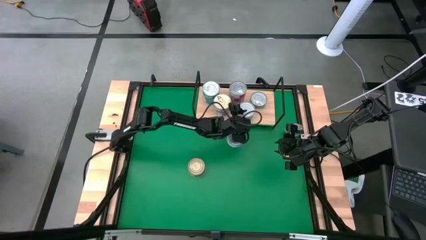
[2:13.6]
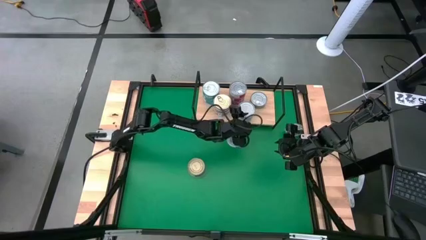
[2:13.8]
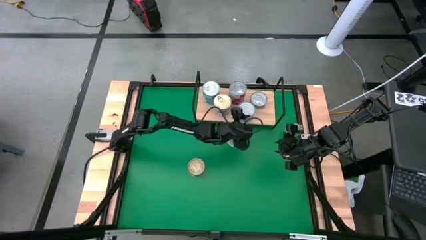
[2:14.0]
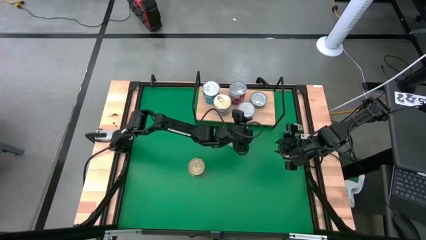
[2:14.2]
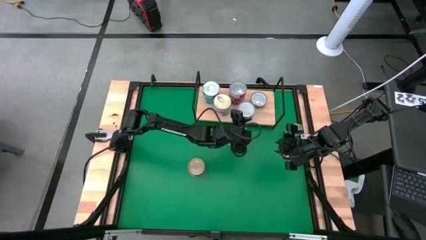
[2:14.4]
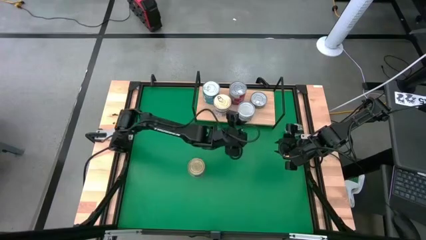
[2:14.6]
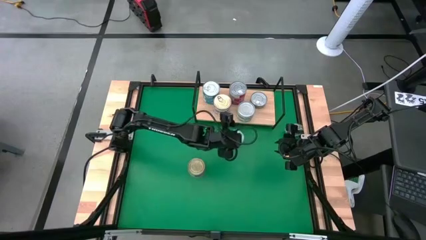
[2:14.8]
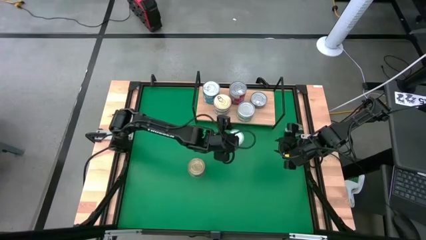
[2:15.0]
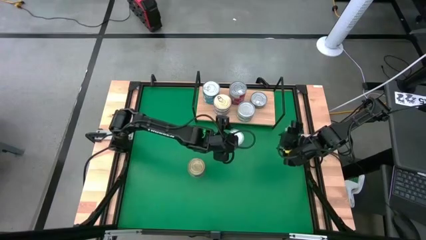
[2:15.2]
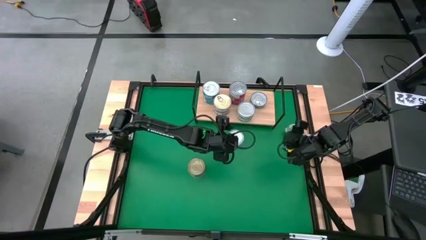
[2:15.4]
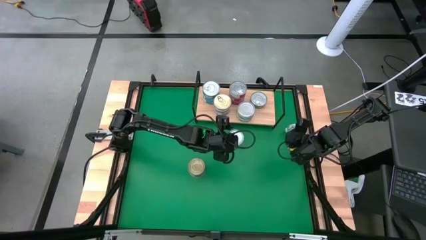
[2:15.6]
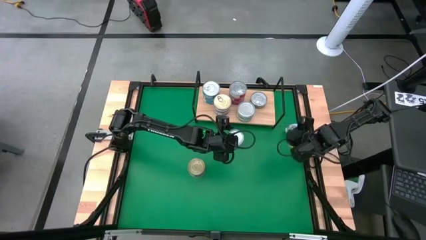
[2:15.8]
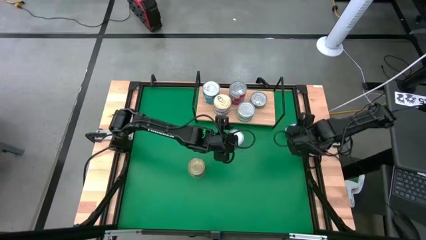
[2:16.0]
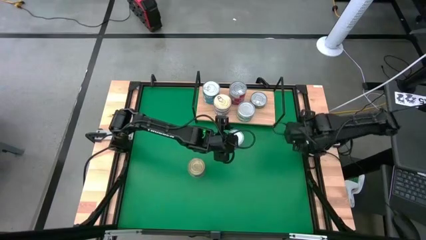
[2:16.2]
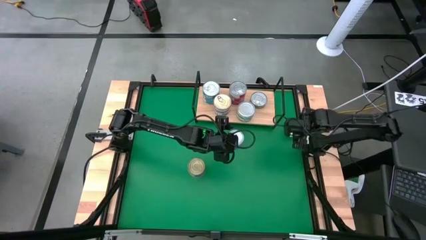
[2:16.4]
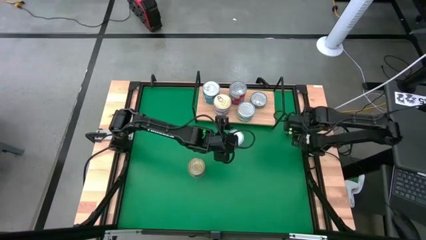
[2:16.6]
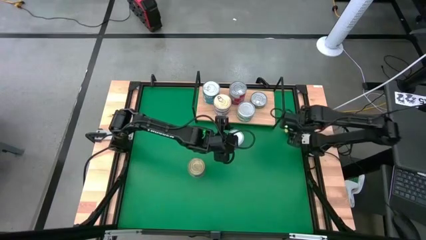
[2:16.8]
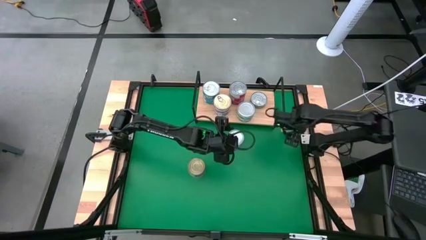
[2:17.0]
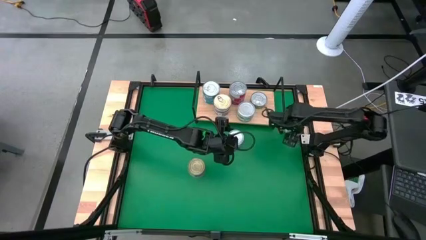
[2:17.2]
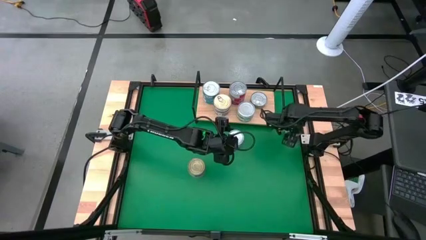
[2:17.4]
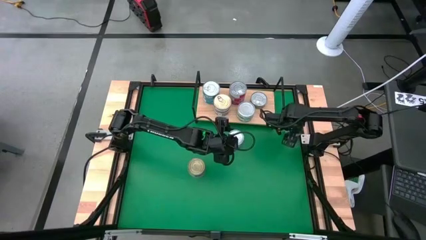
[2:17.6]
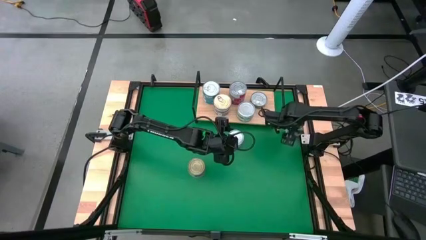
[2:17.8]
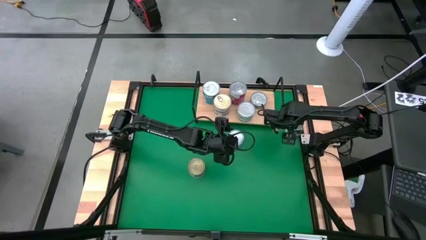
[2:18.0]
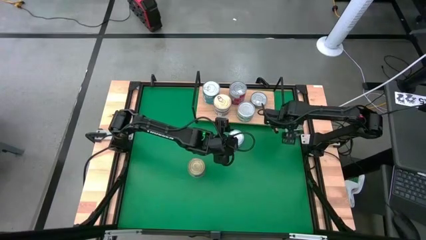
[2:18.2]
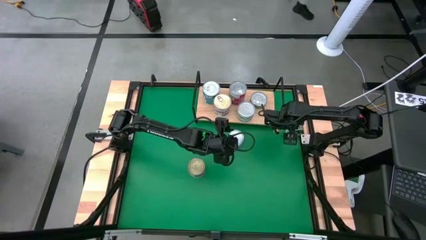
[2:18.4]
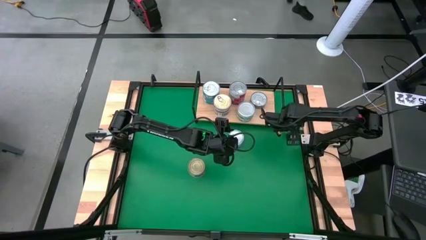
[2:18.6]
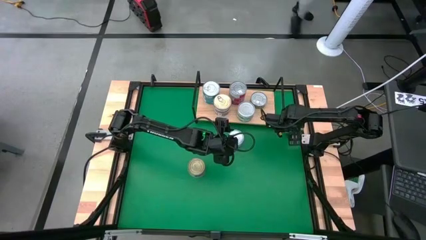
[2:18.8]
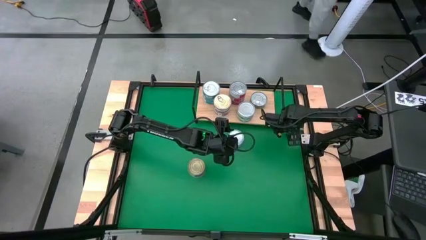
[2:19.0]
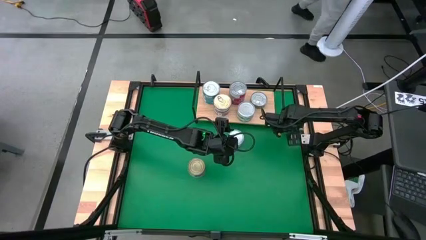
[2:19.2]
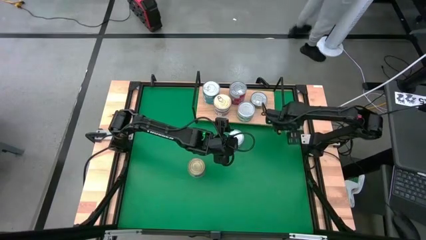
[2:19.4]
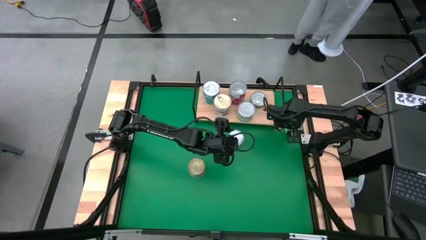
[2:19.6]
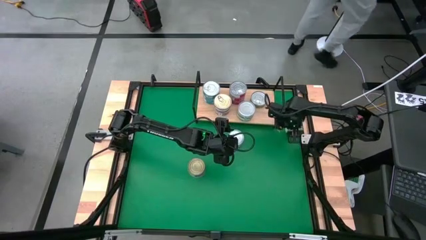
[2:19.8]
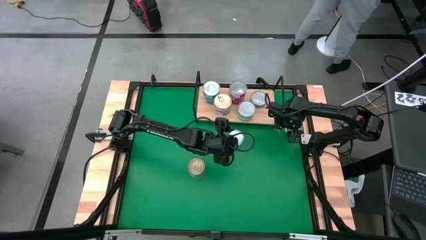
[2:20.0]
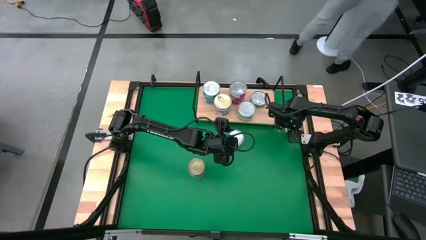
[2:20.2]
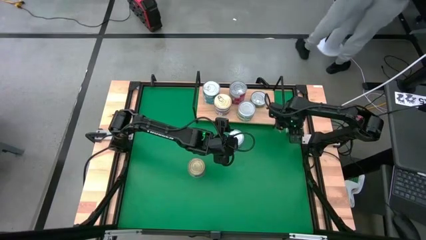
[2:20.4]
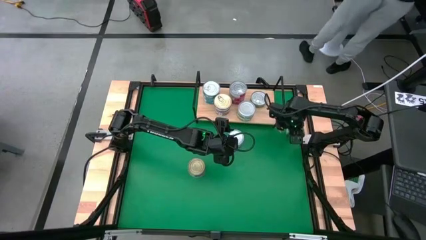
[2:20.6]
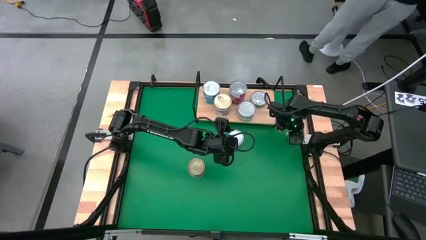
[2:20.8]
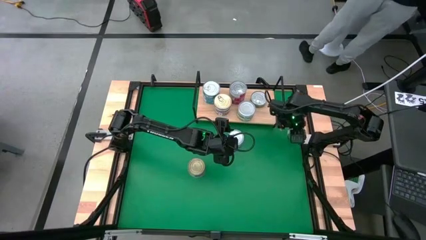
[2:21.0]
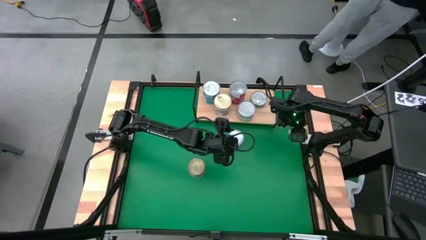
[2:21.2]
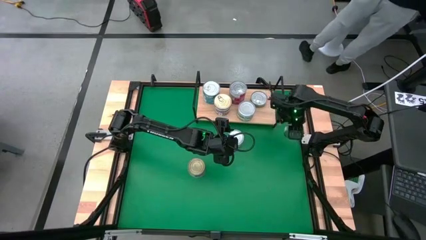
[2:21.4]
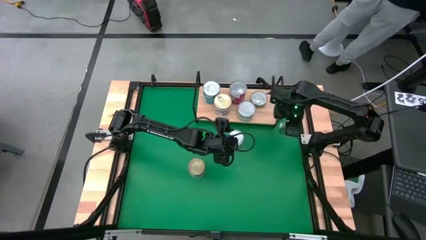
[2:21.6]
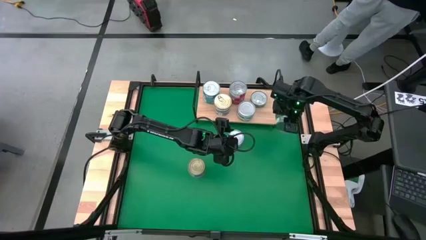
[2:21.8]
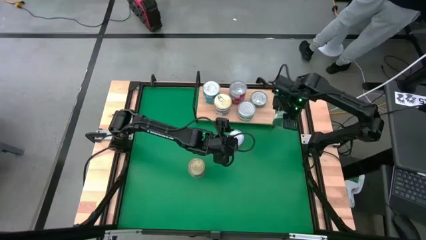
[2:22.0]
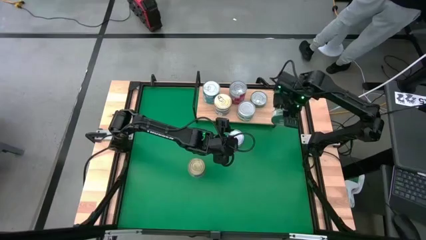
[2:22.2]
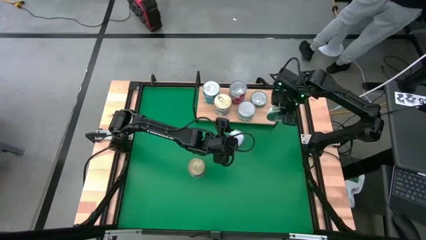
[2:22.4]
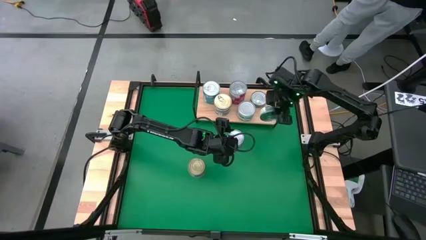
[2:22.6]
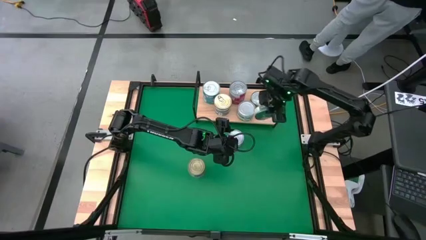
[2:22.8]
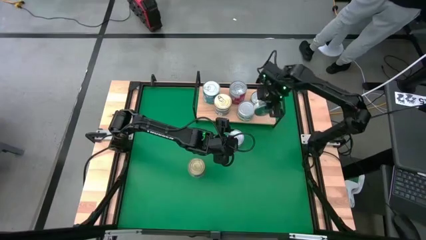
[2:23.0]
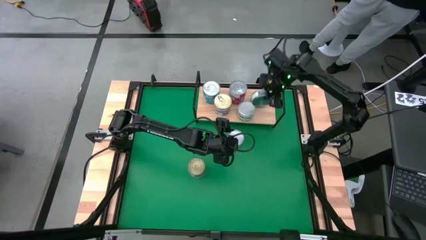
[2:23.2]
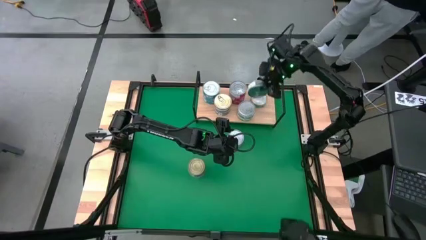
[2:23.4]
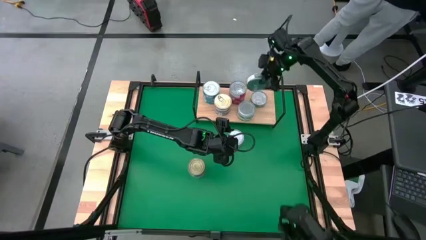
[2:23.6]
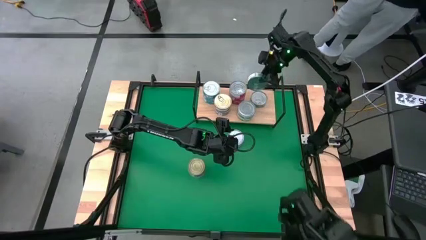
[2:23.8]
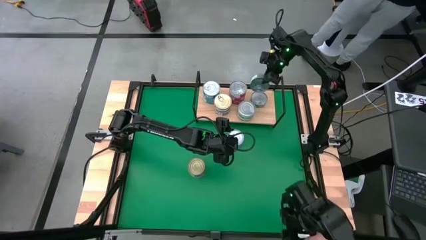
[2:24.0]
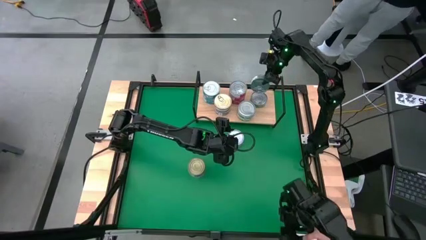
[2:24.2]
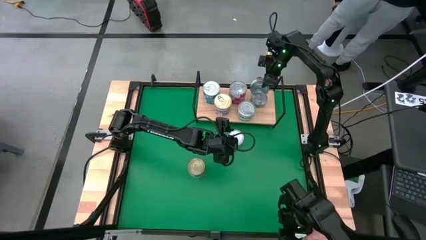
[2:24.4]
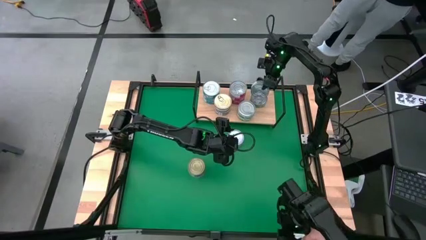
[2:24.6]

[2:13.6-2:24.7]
Task: Stack canned seafood by type on shelf
Stack the green tuna can on top of the green tuna can on the shelf

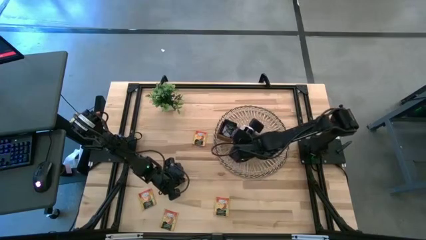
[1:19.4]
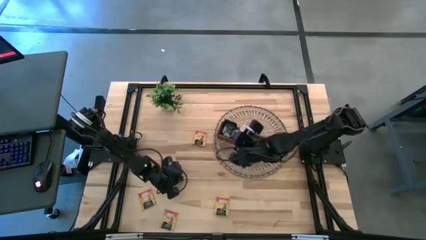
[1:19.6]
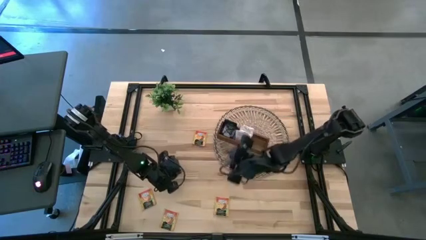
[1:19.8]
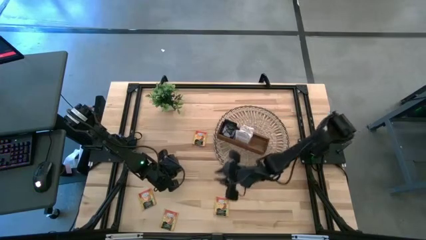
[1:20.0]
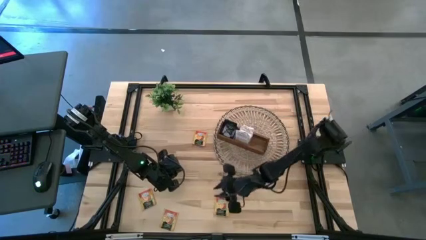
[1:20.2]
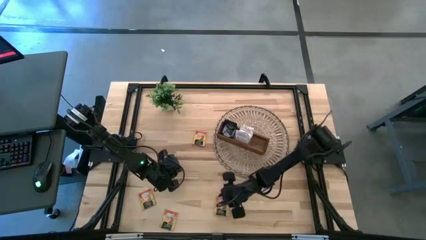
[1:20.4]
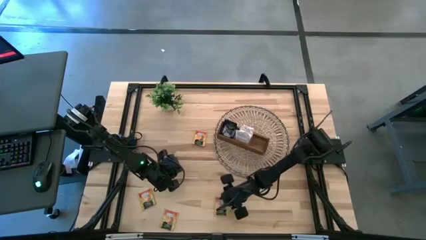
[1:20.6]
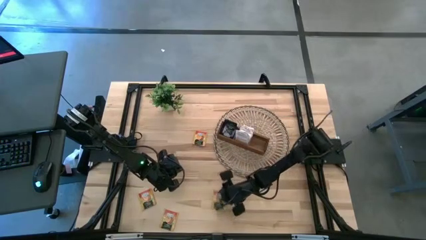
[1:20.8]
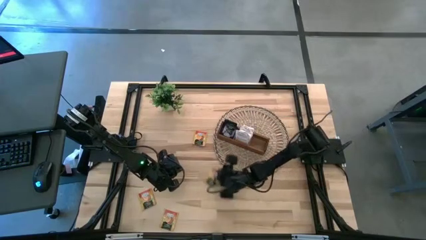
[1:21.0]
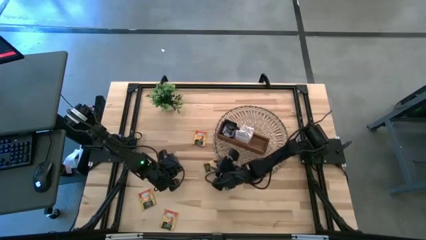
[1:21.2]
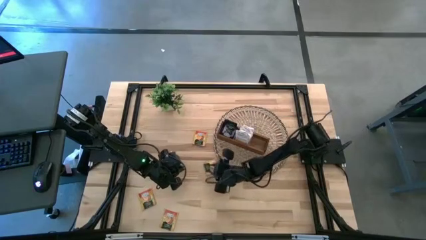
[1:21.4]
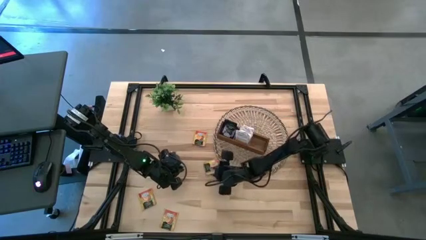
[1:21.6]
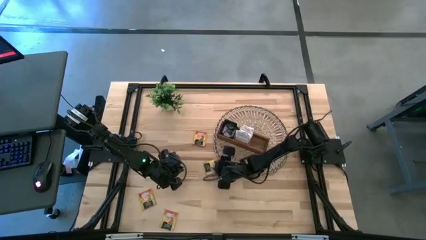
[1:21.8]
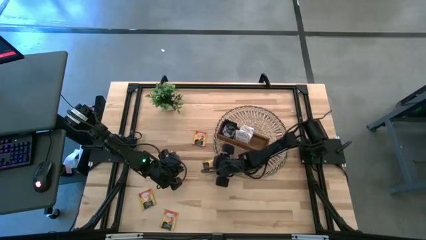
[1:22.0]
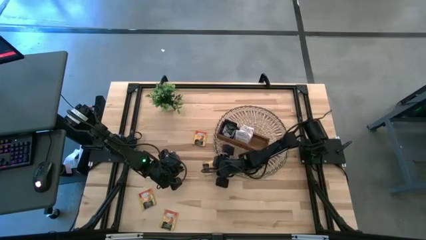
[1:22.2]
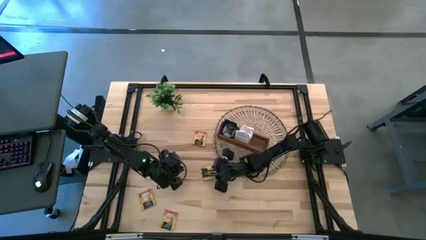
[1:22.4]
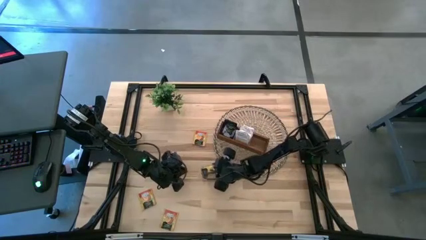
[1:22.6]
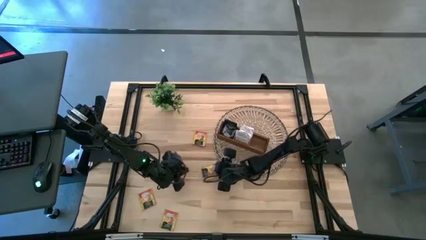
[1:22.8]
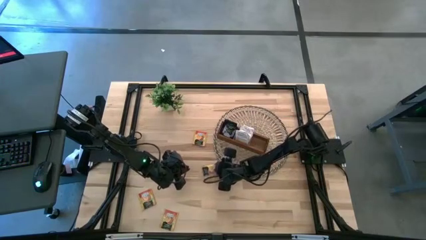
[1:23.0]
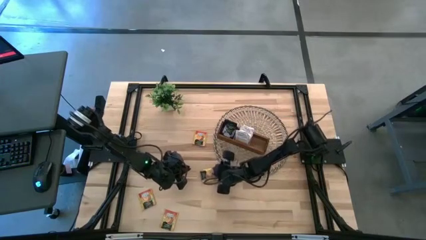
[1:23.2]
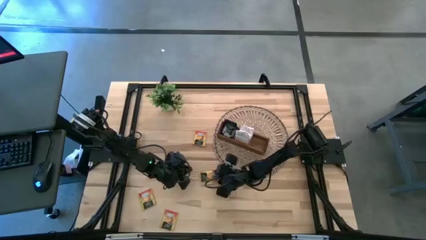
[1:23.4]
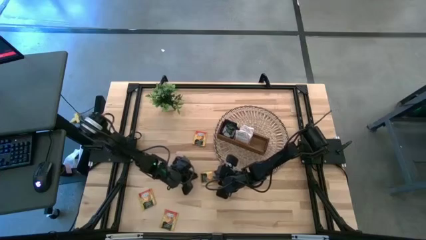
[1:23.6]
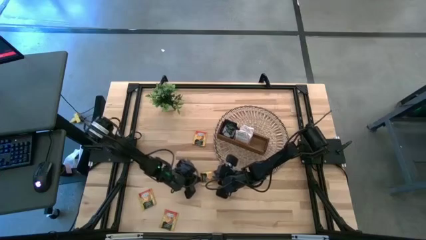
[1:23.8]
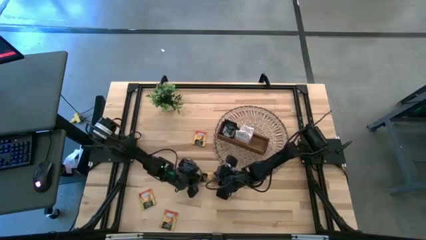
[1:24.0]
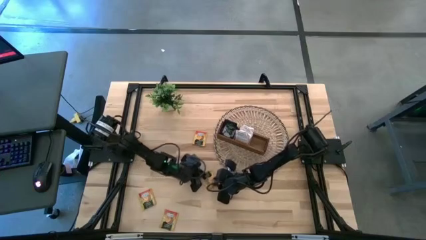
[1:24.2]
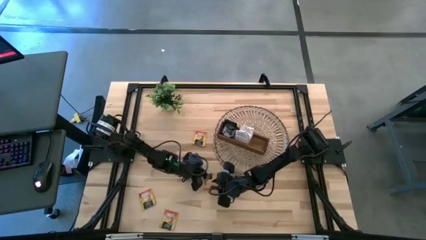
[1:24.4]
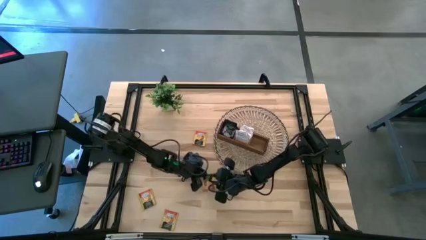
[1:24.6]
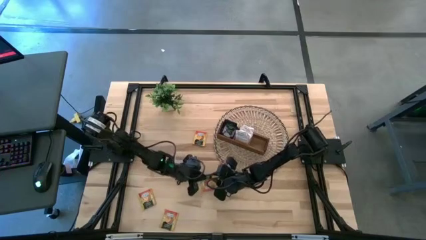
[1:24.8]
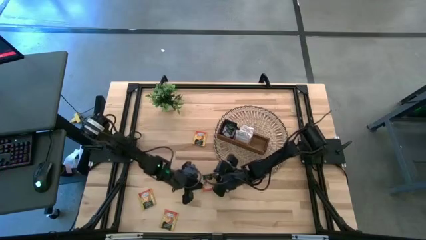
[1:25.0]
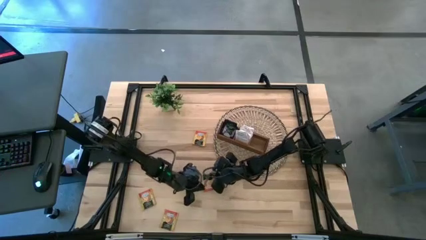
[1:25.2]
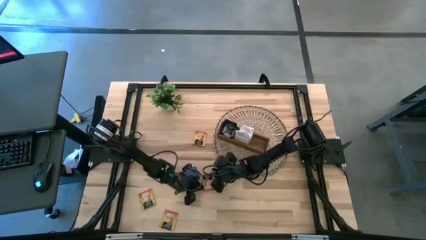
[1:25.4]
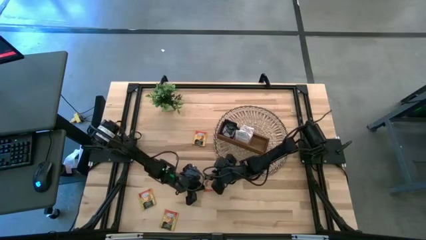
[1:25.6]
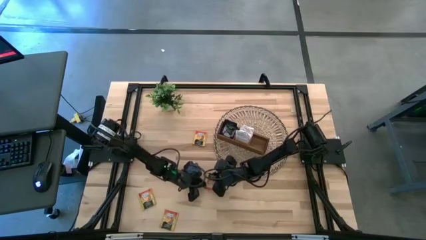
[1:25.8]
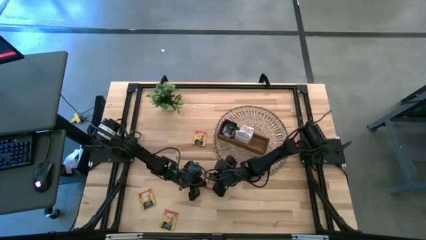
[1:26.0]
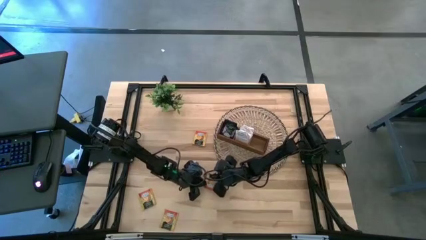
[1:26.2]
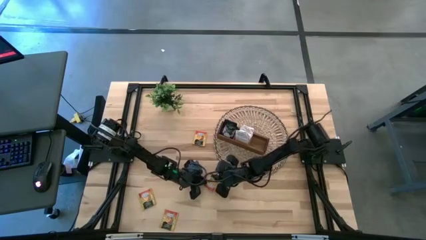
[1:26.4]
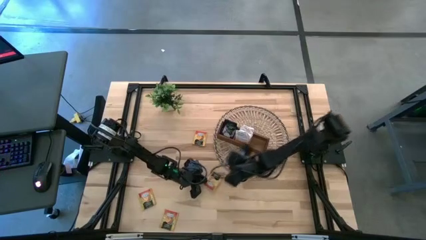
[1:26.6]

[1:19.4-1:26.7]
Task: Pick & Place Tea
Put the orange tea bag into the right section of the wooden organizer
